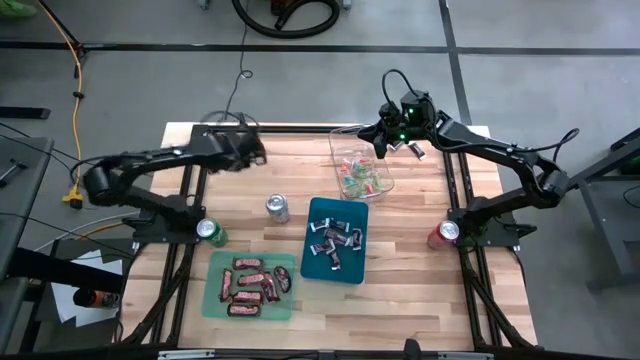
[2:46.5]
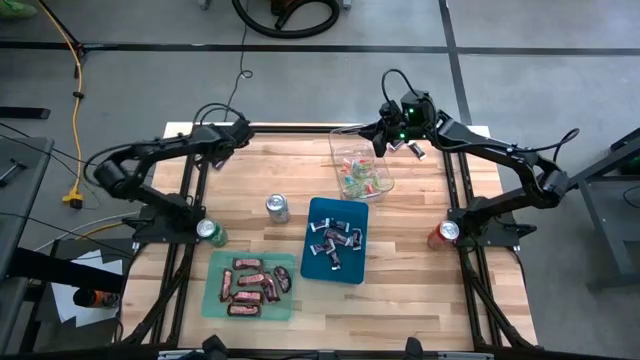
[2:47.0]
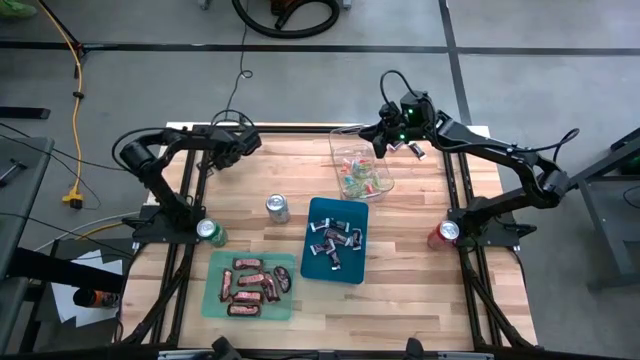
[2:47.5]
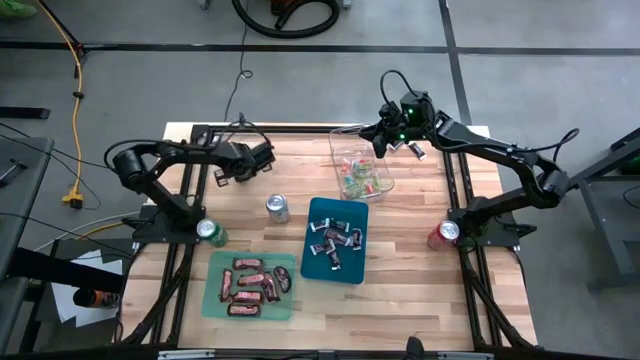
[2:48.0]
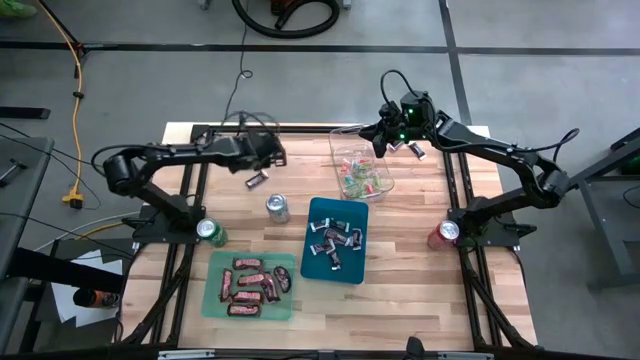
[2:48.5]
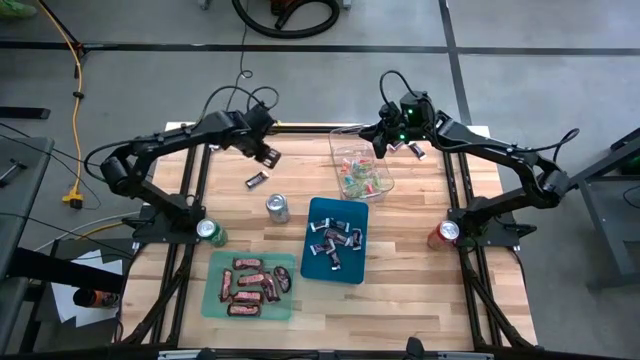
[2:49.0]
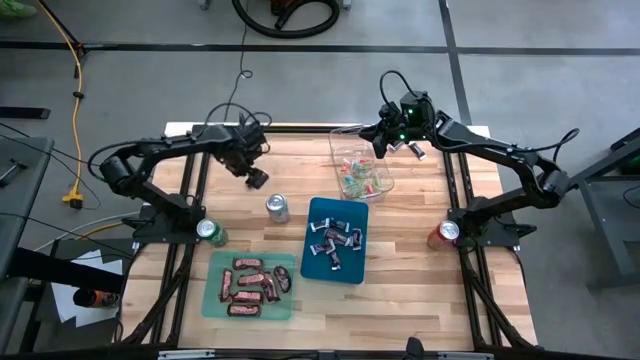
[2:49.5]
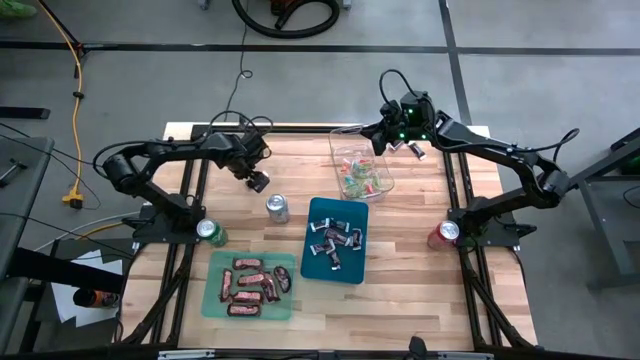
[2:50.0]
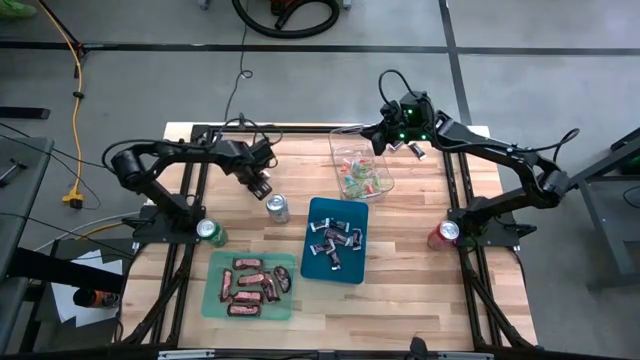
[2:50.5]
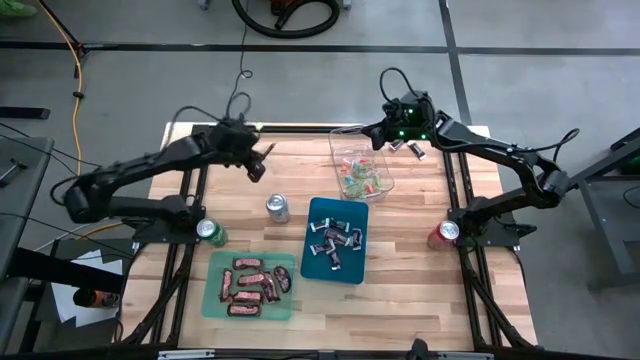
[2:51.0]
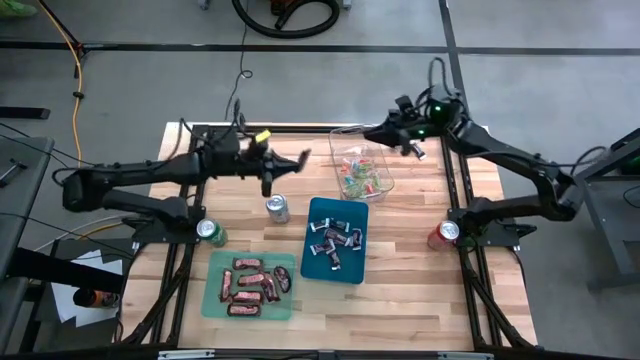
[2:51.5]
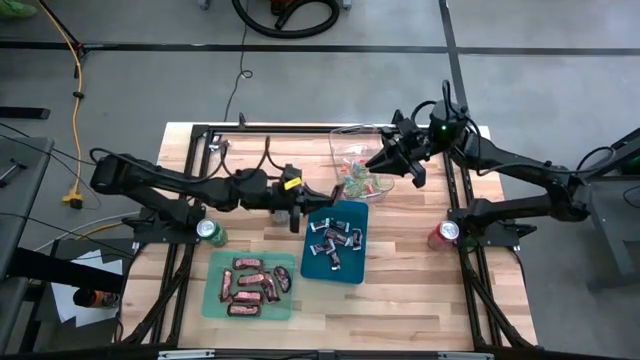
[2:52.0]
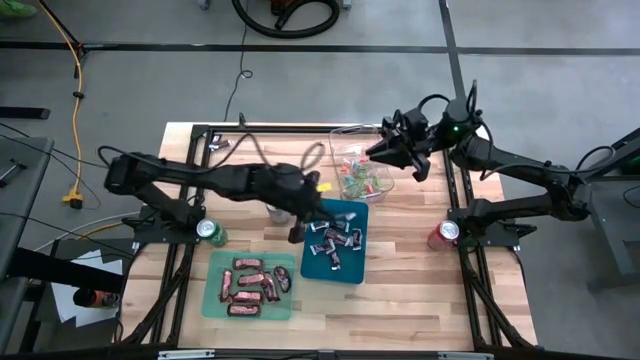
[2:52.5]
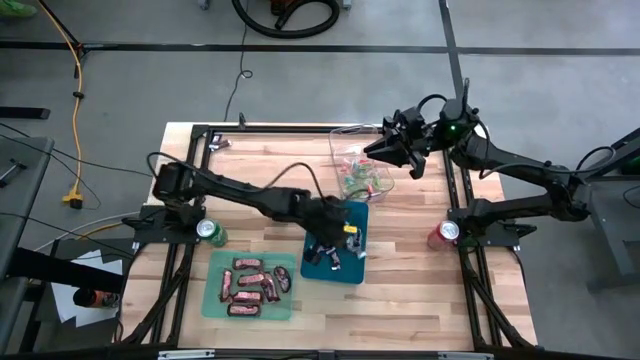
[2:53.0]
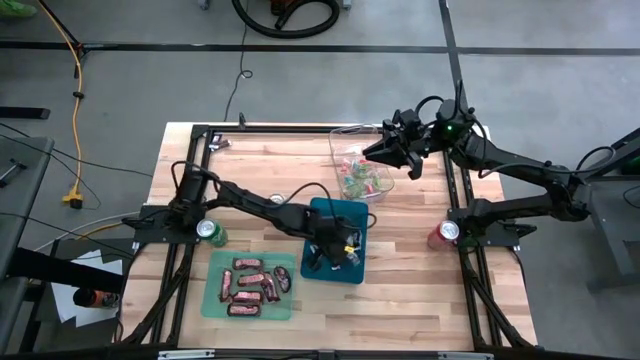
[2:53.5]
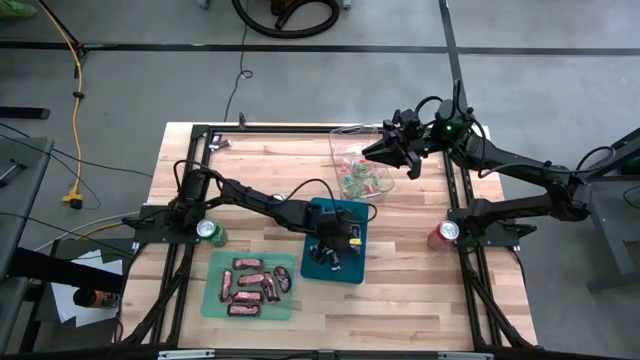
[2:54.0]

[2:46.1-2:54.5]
Task: Sort candy
Put the brown-white chocolate into the blue bin

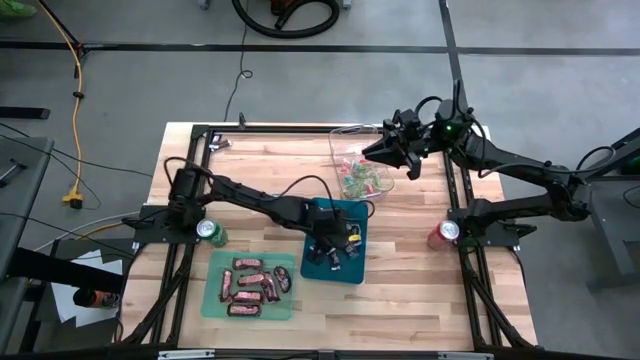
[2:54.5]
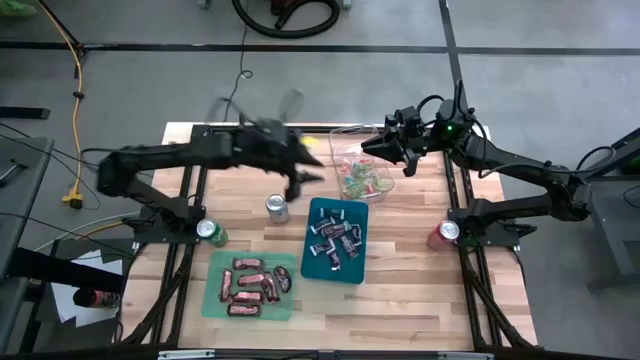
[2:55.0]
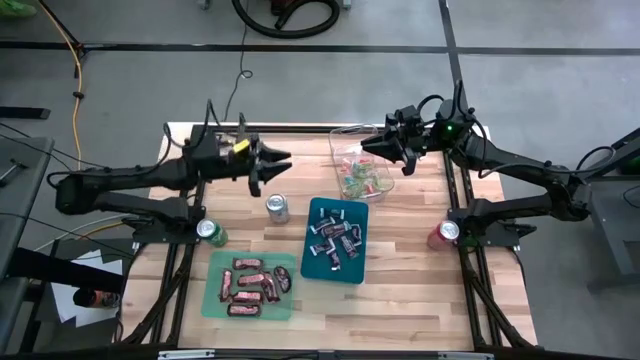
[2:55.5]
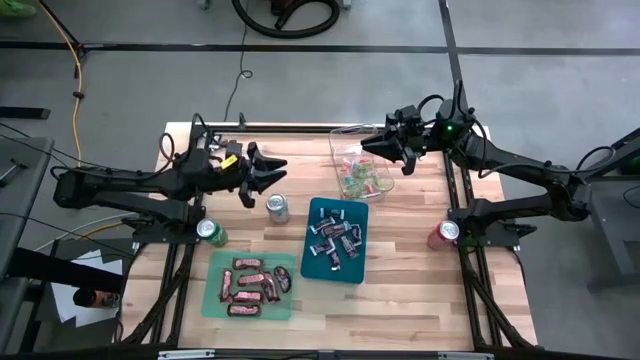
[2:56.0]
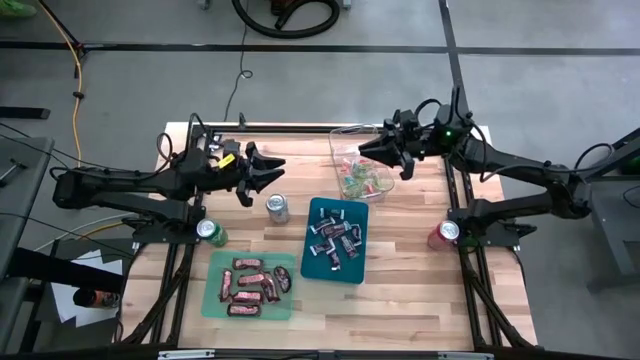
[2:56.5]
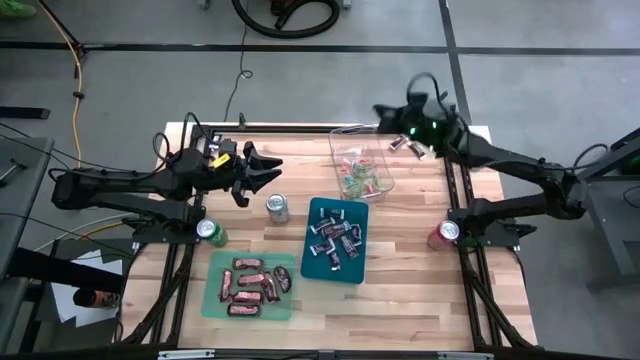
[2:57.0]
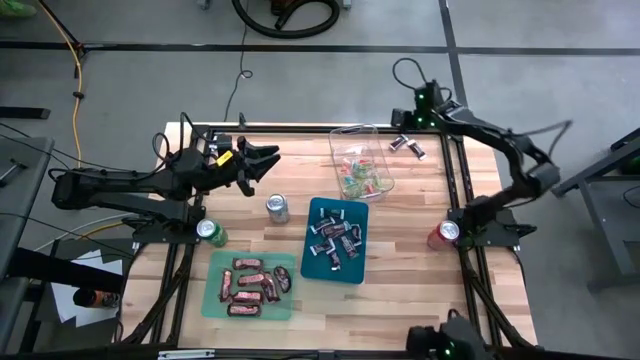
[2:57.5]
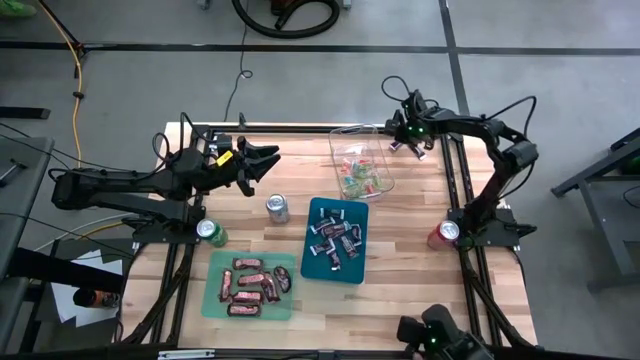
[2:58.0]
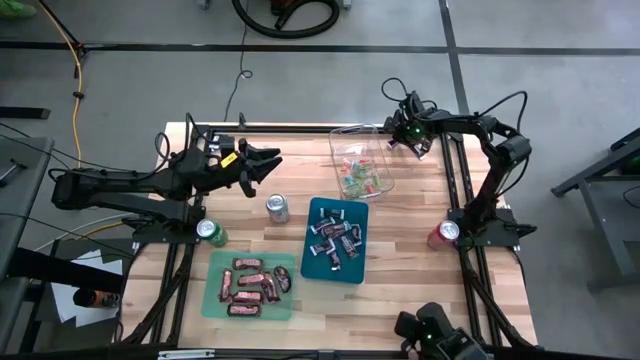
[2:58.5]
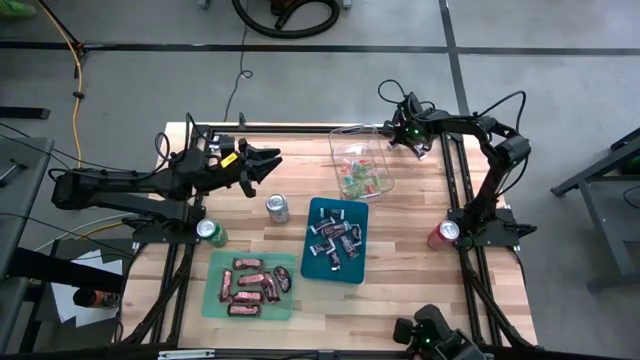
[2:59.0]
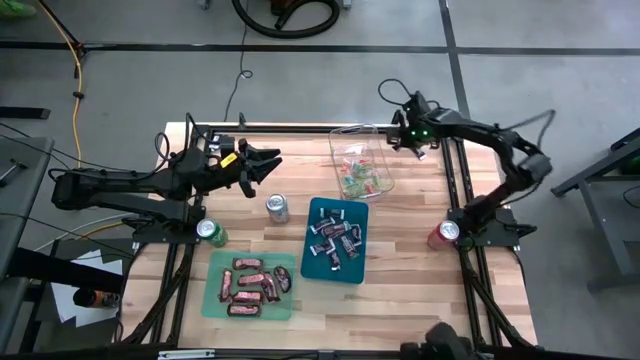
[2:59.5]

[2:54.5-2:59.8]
Put the brown-white chocolate into the blue bin

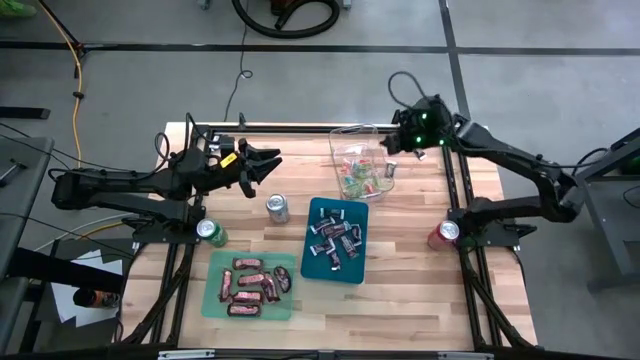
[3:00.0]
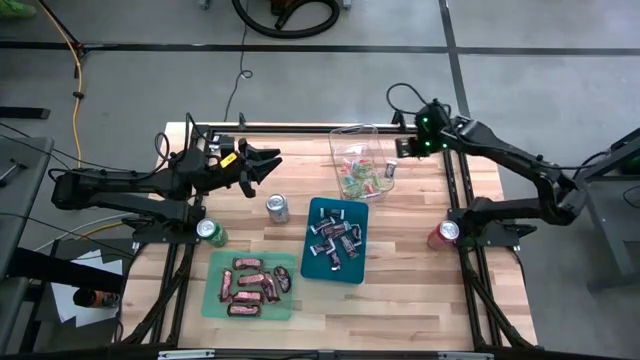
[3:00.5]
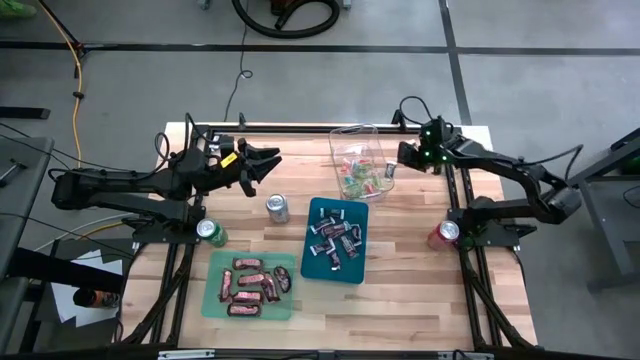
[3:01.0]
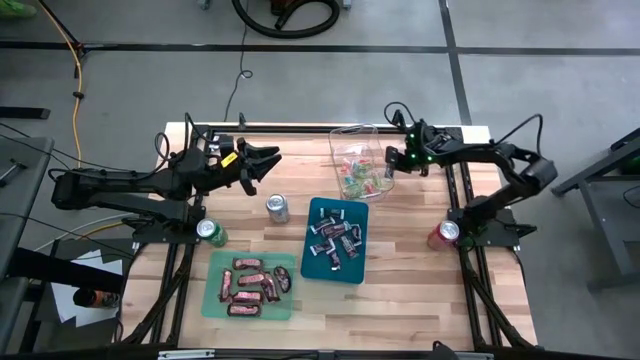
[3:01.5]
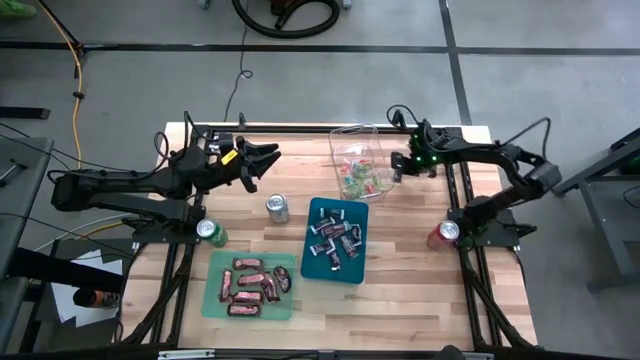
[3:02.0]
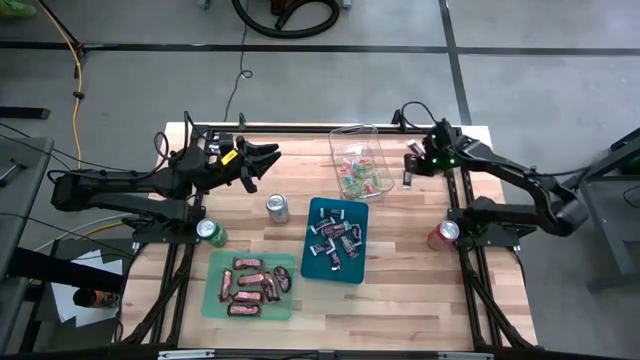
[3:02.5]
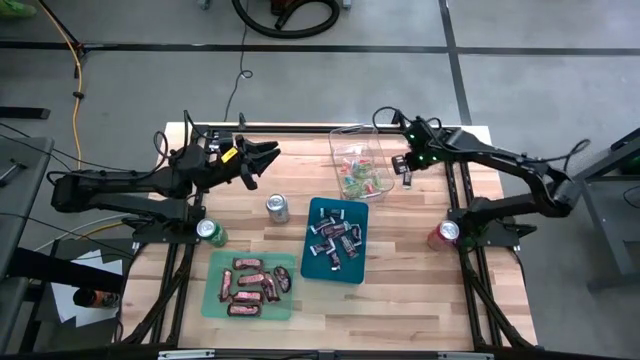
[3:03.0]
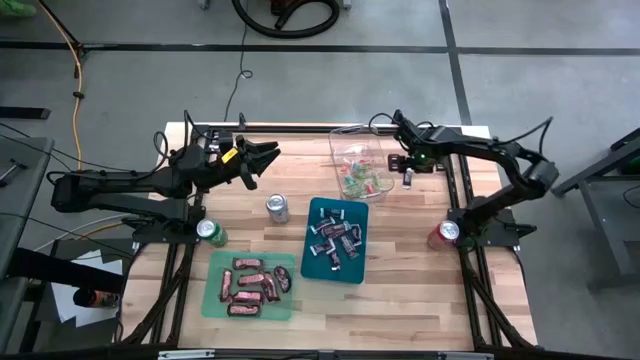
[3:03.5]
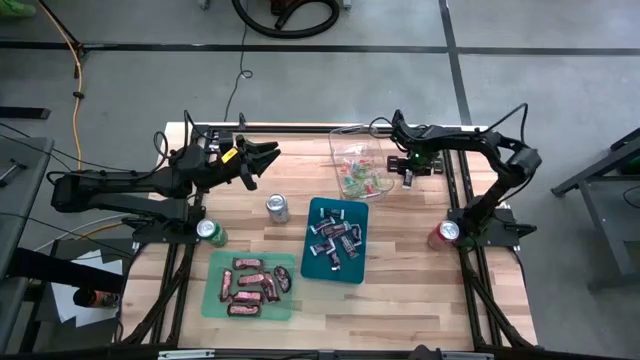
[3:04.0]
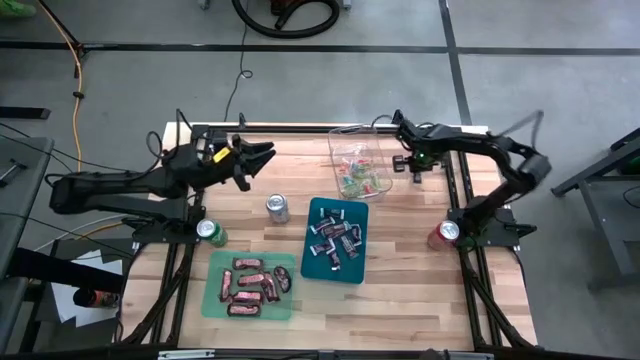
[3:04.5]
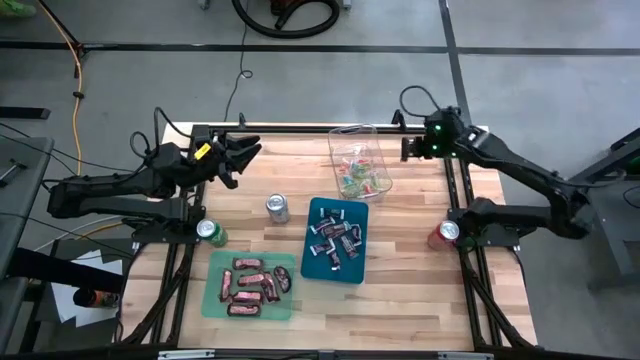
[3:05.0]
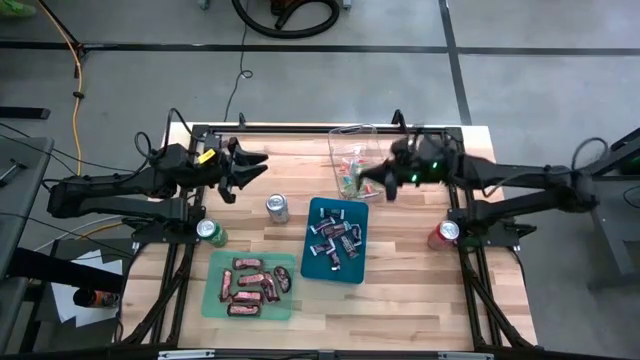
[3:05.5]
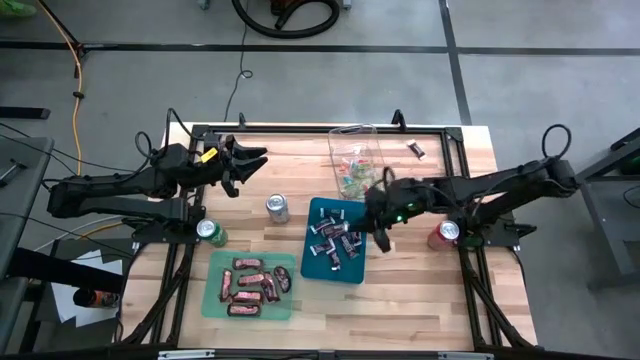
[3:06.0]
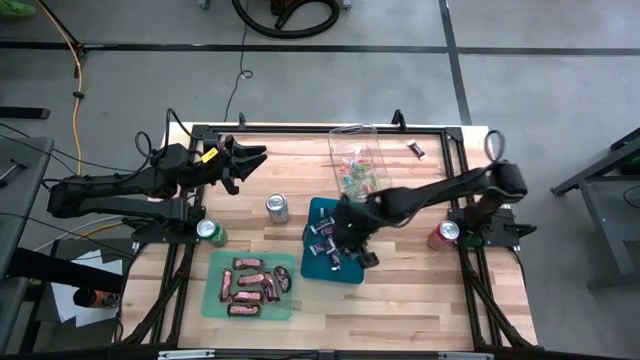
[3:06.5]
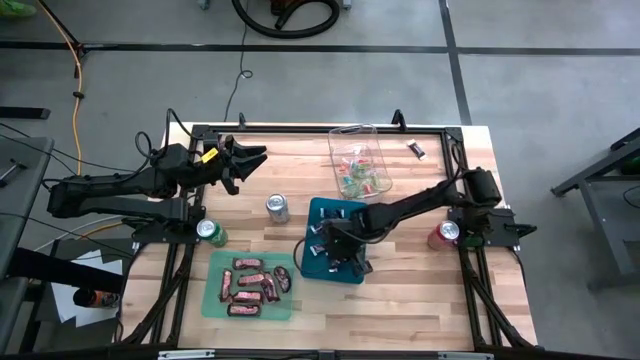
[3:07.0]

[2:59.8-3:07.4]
Put the brown-white chocolate into the blue bin
